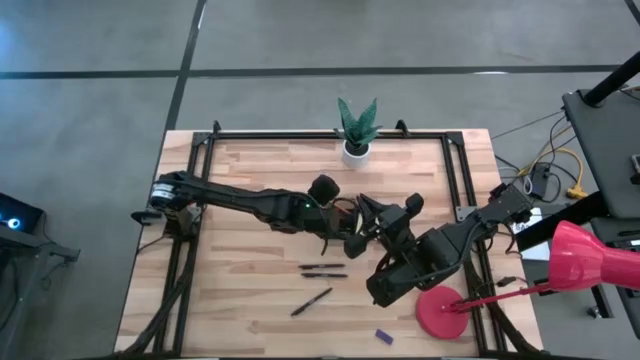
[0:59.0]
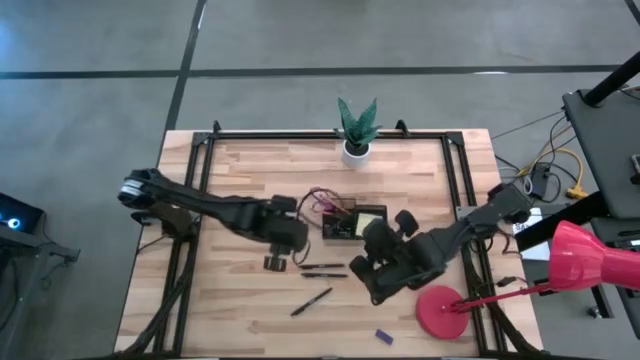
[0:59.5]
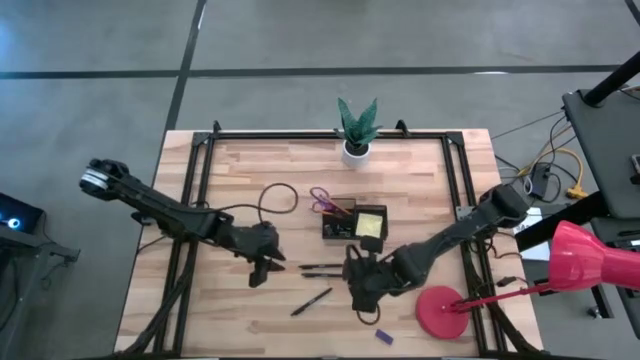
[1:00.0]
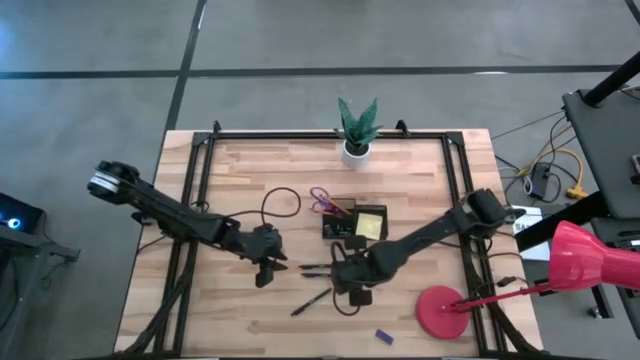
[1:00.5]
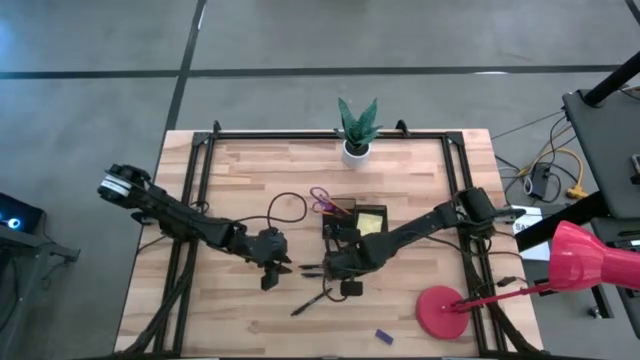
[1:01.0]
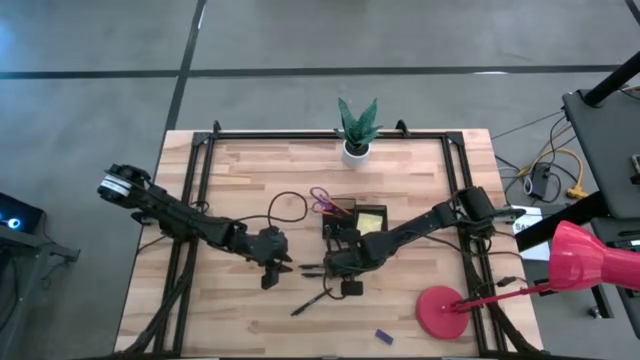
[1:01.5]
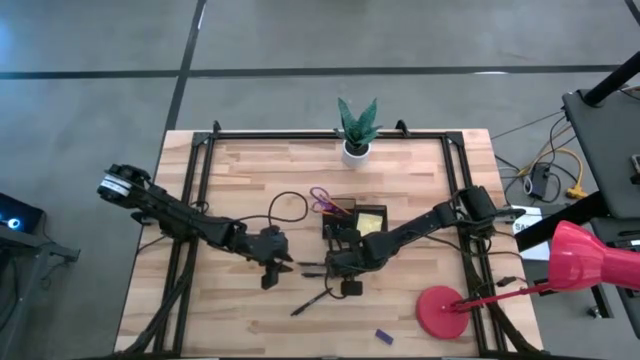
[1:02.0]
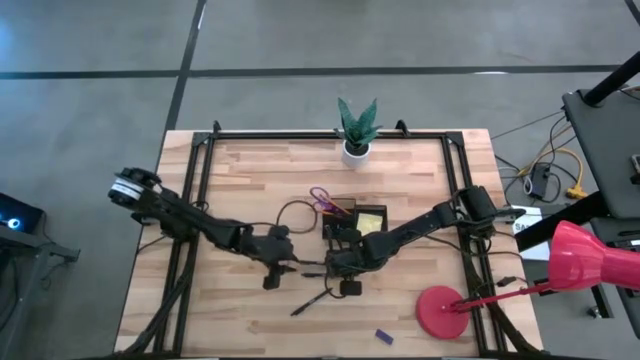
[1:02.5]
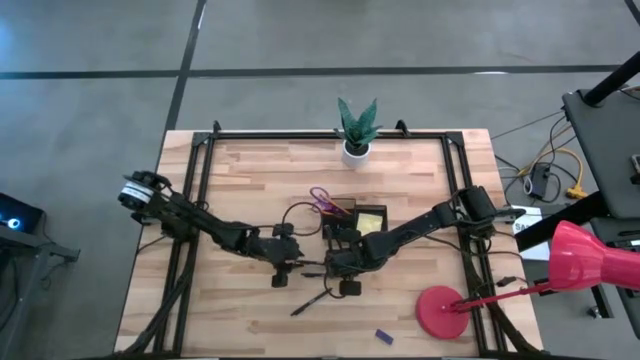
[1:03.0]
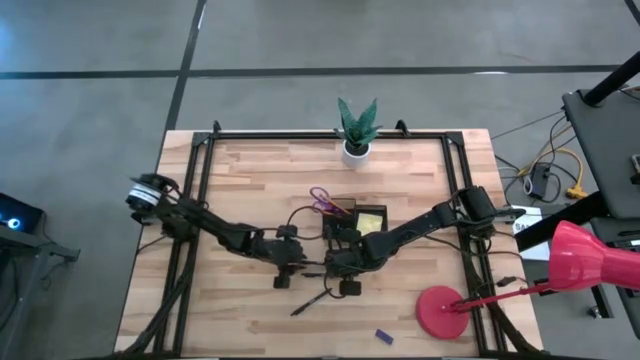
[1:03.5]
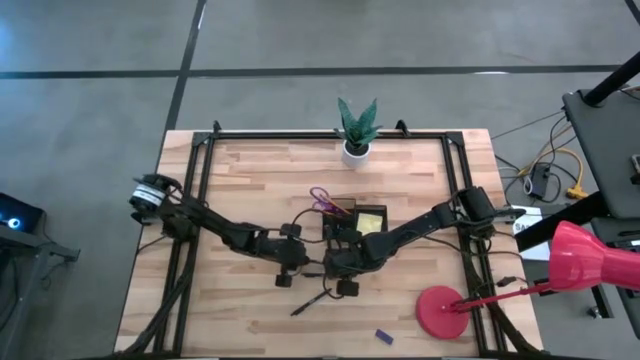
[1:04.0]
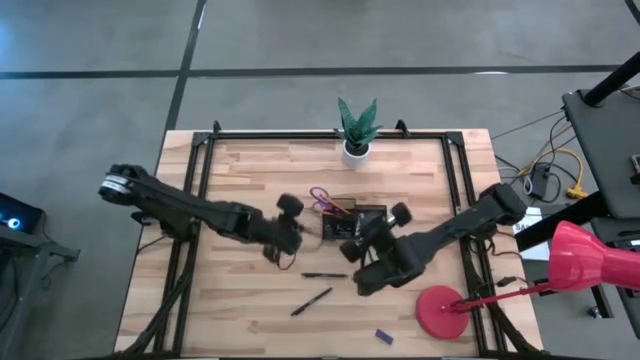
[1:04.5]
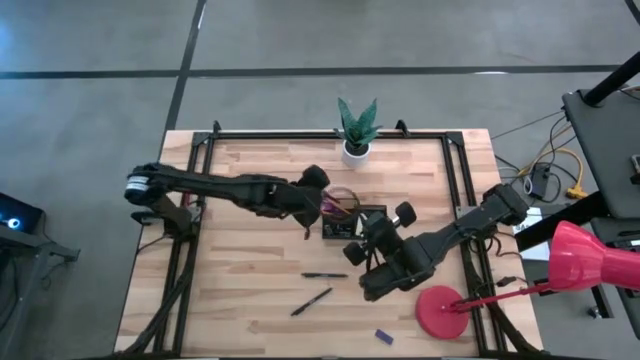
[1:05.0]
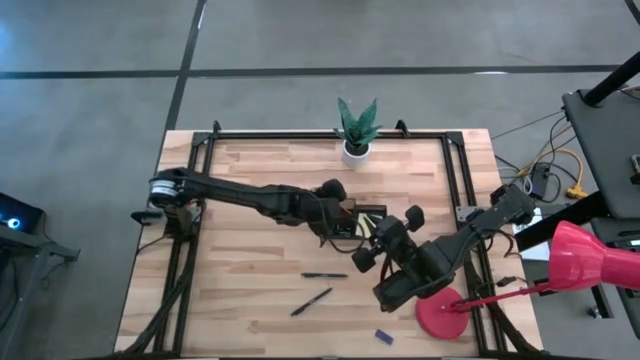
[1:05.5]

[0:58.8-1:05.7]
Task: Pick and place office supplies into organizer
Put the top black pen into the black organizer

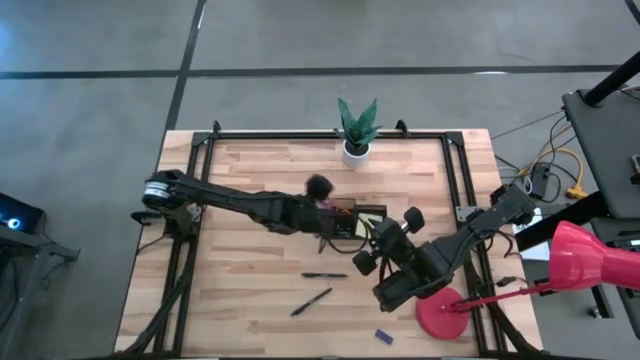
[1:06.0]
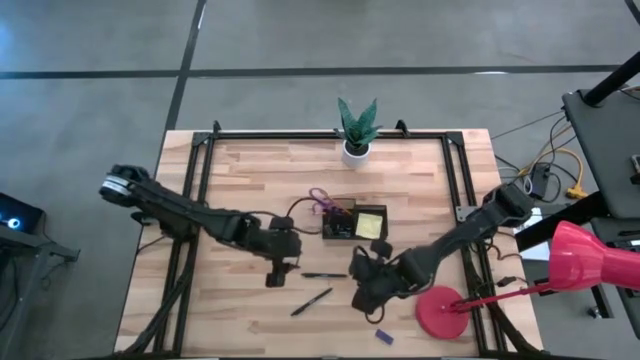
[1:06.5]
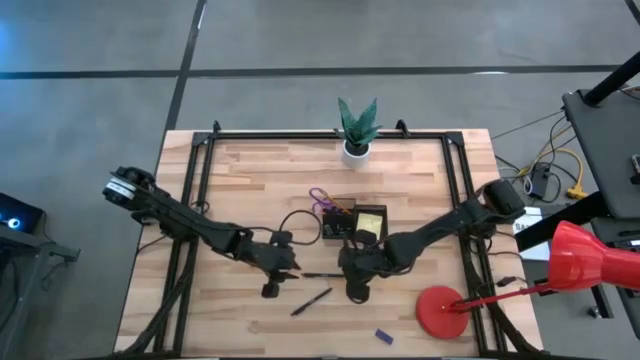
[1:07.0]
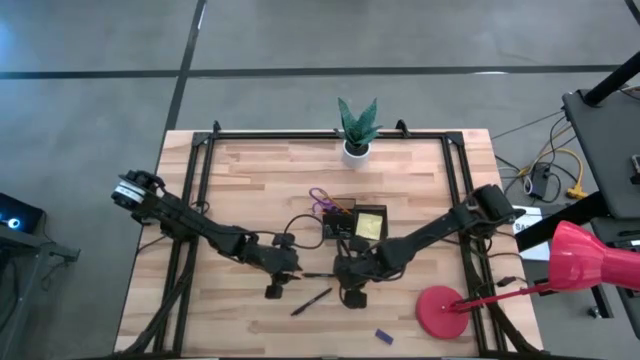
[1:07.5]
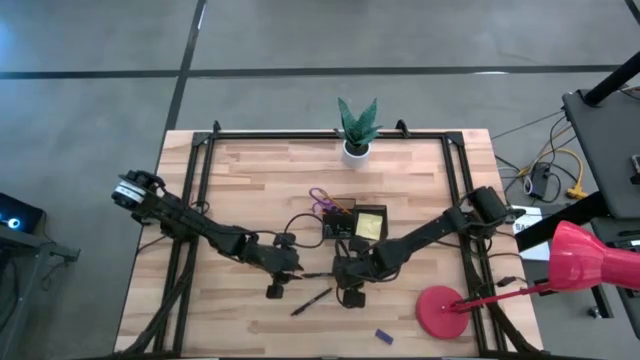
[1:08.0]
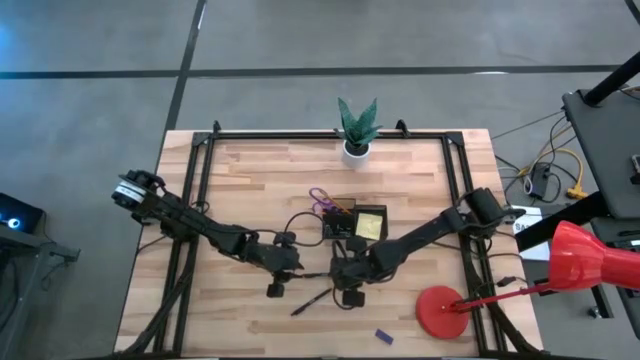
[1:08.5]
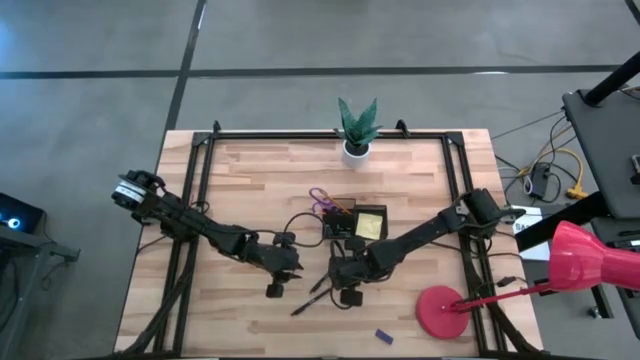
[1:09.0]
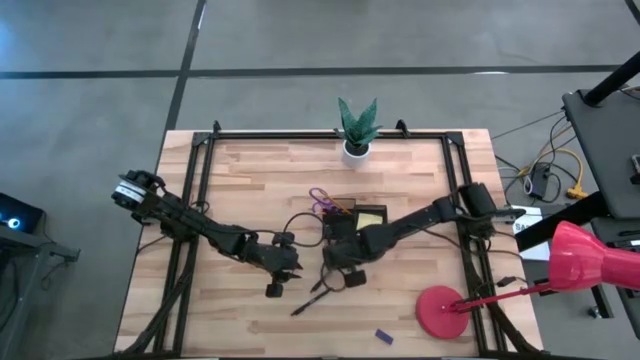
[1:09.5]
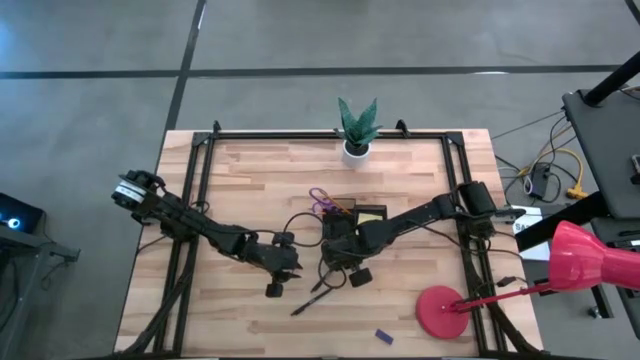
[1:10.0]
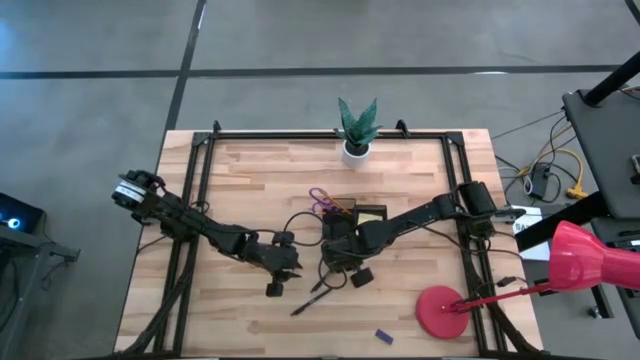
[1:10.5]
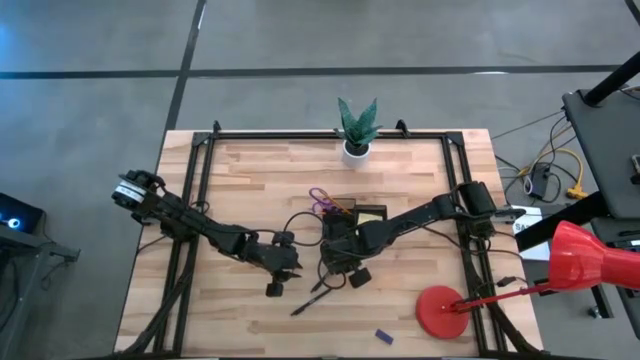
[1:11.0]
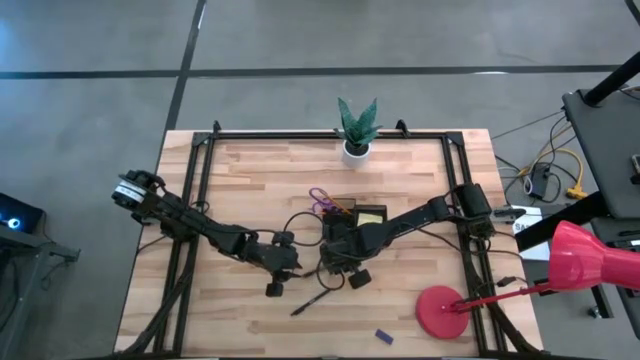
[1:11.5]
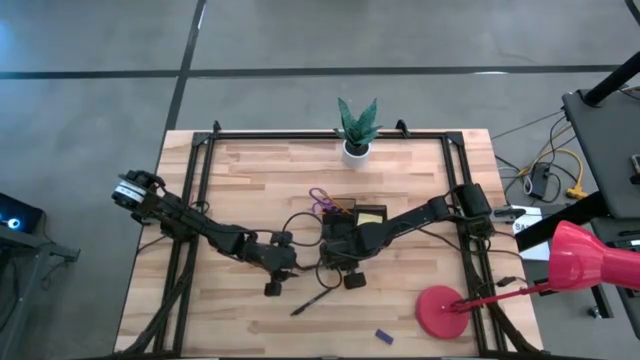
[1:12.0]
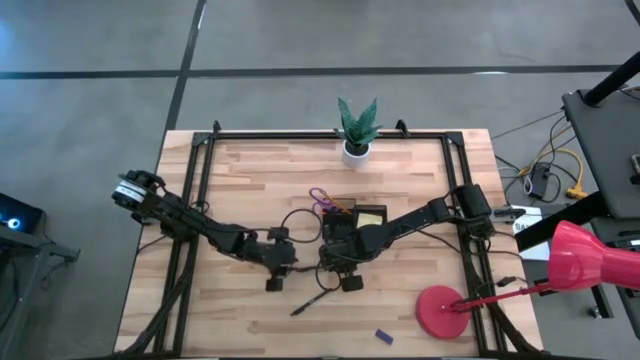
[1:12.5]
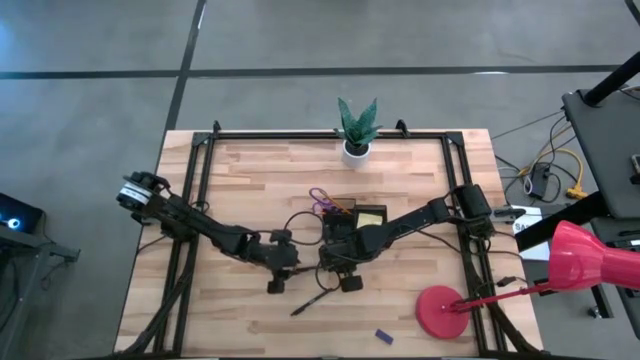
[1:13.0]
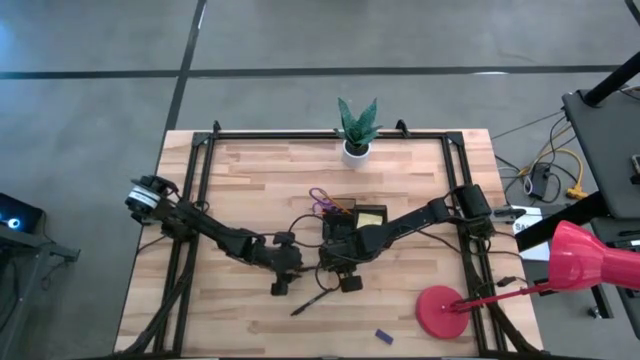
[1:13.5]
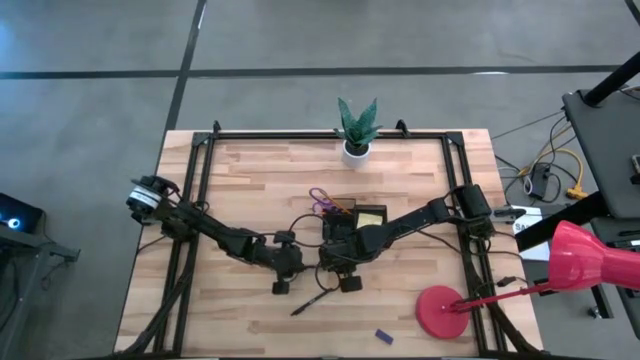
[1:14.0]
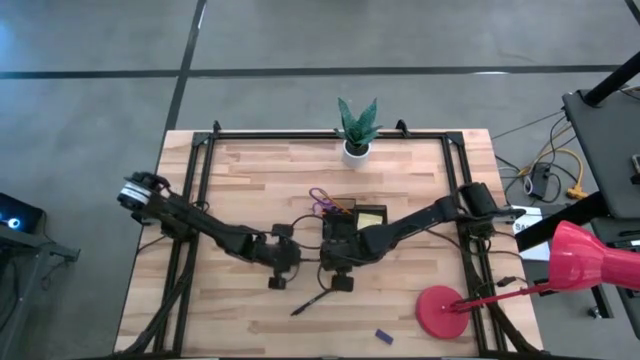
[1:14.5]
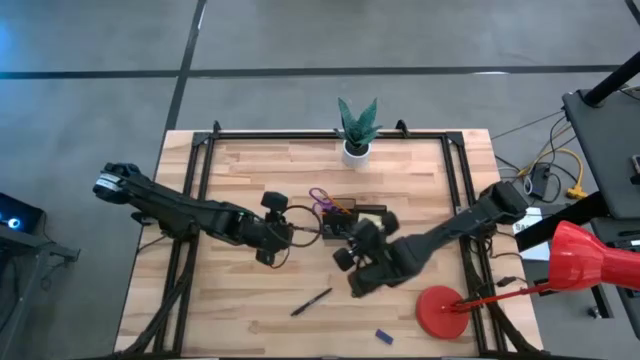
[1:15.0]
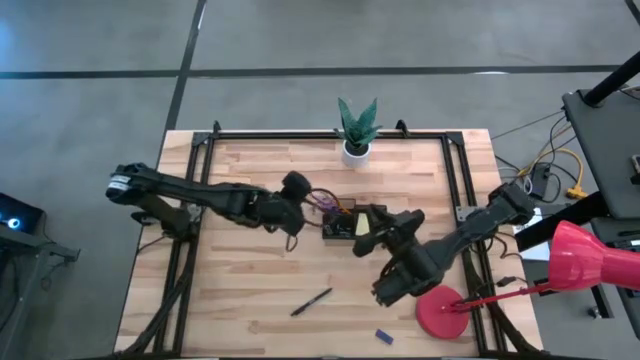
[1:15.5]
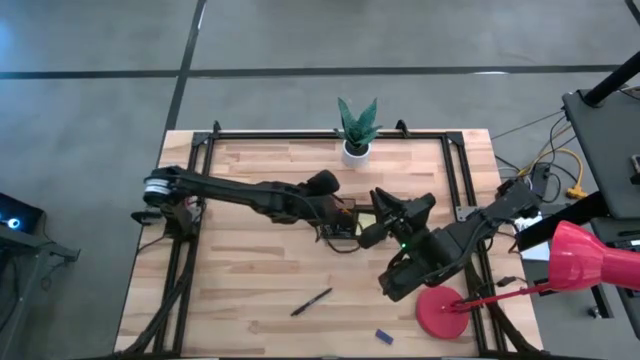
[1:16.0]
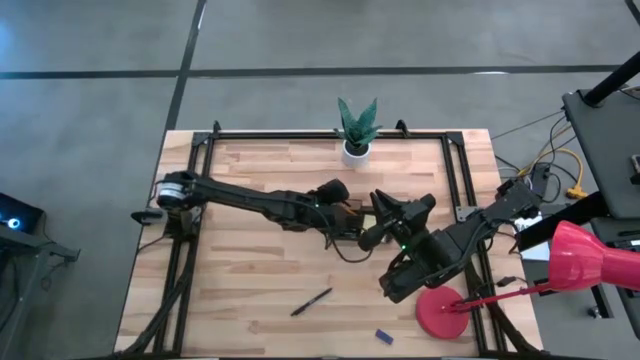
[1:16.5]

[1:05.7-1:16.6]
Put the top black pen into the black organizer

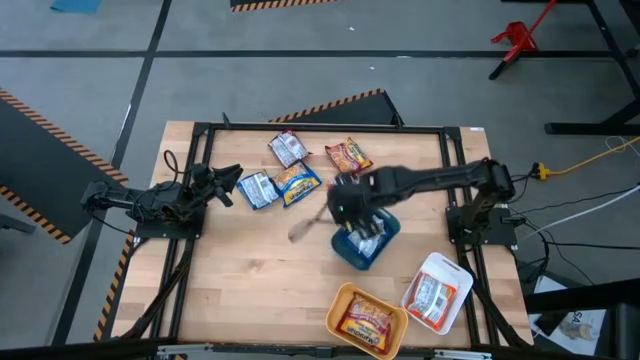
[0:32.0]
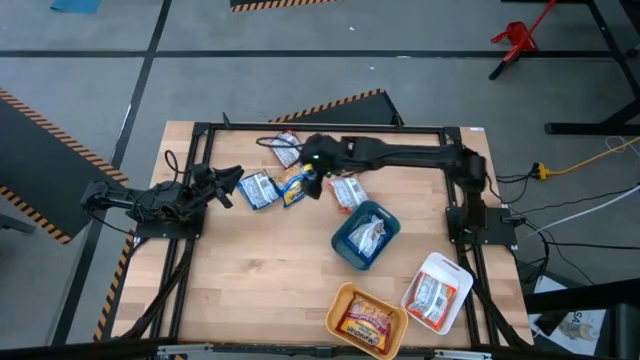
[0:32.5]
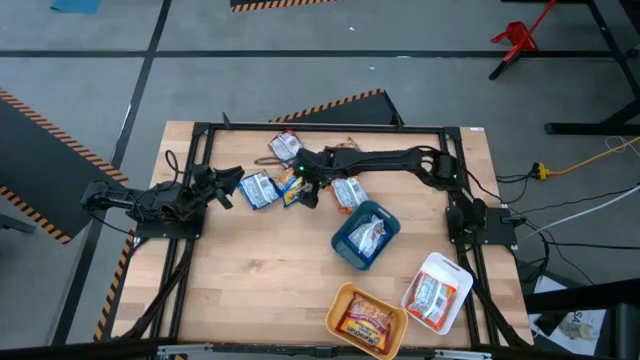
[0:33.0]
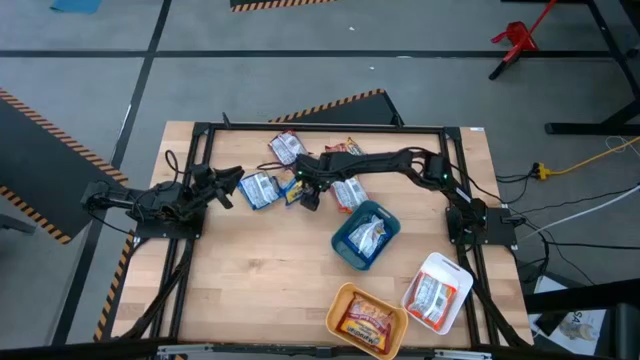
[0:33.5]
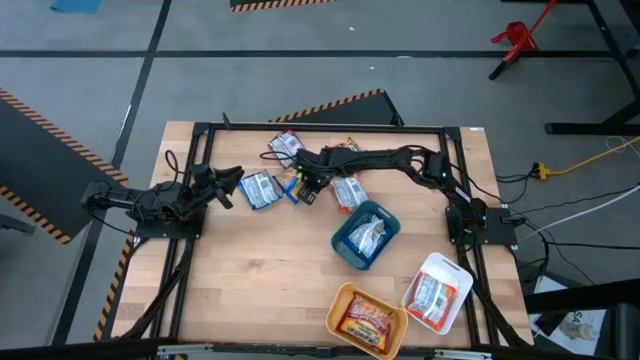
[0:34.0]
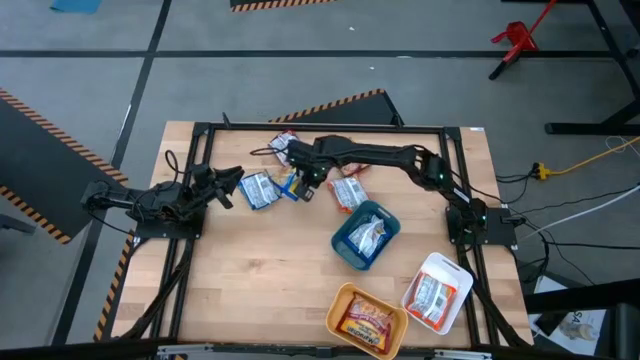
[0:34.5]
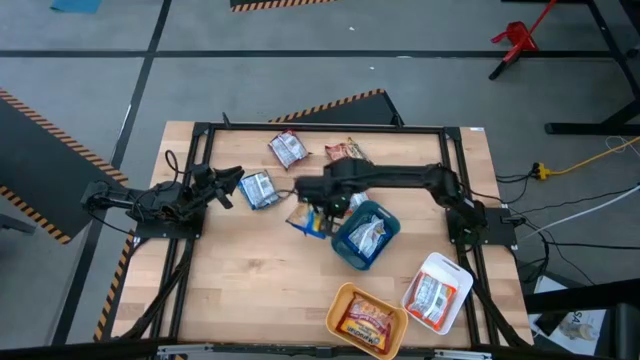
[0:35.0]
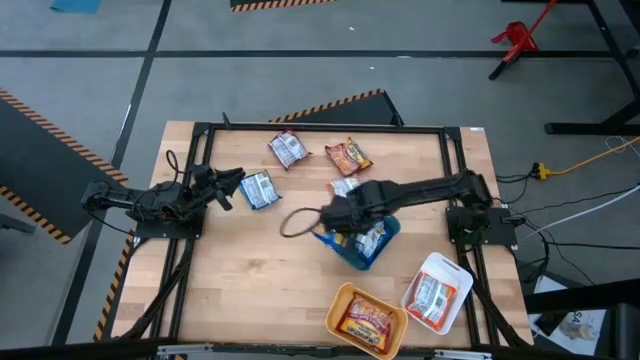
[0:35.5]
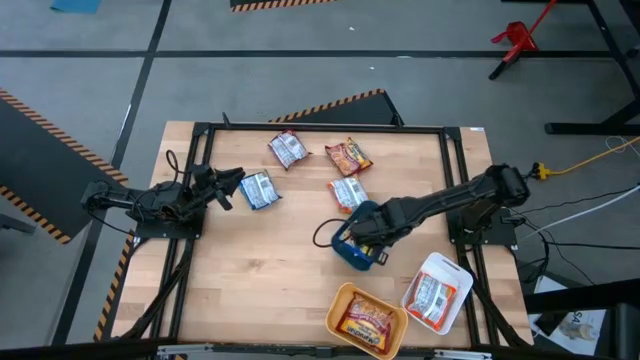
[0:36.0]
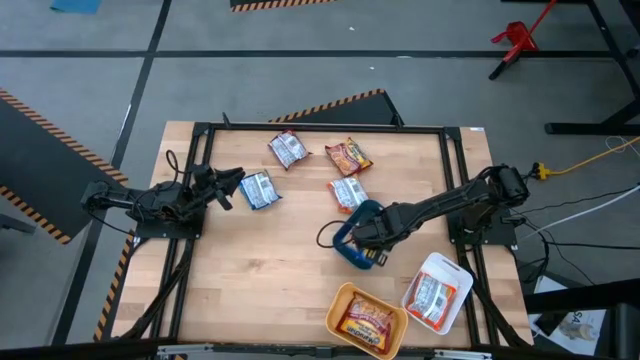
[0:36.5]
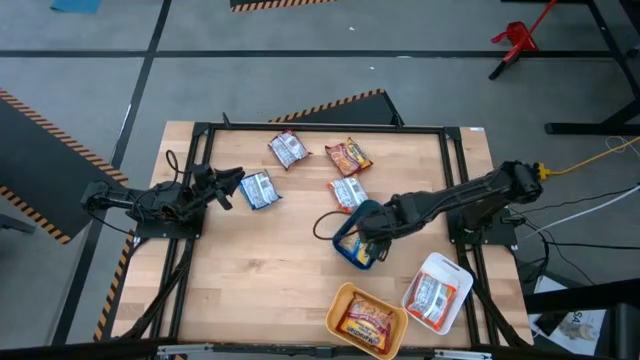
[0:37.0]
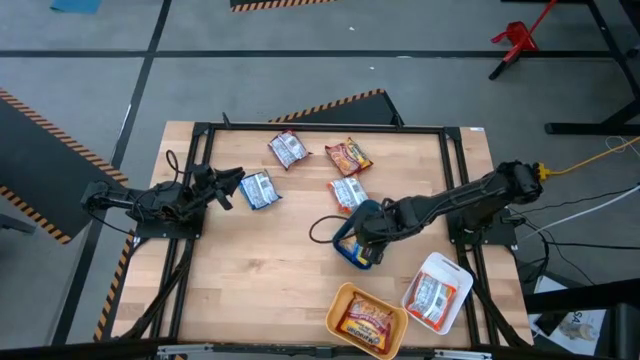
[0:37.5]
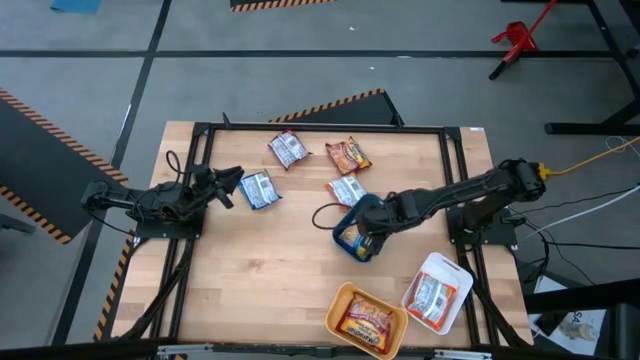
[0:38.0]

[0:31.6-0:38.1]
Task: Sort Maruchan noodles
Put the right blue noodle pack into the green bin
